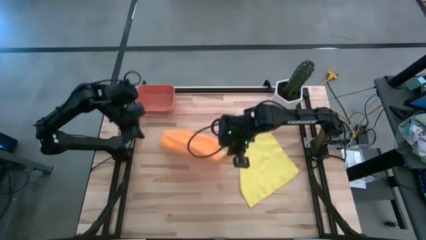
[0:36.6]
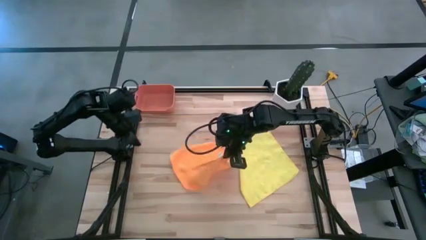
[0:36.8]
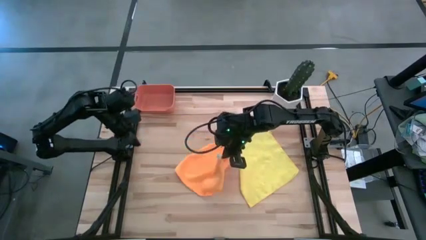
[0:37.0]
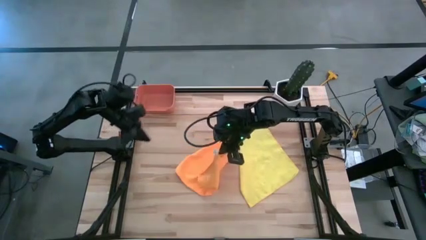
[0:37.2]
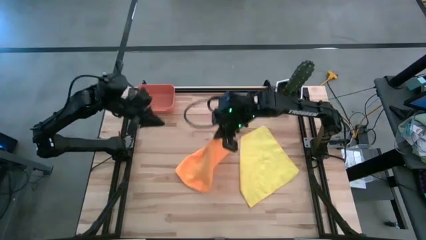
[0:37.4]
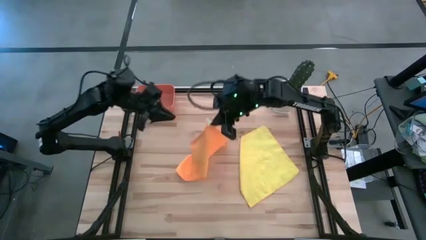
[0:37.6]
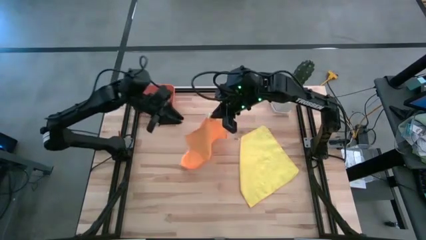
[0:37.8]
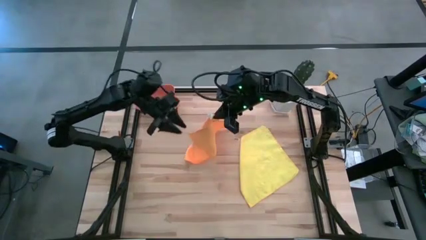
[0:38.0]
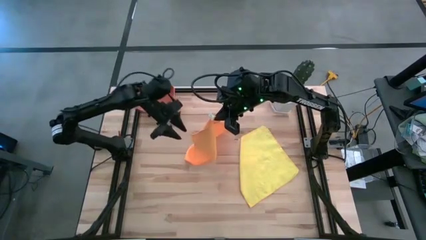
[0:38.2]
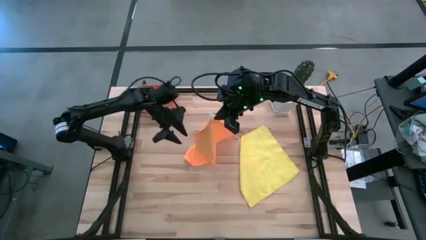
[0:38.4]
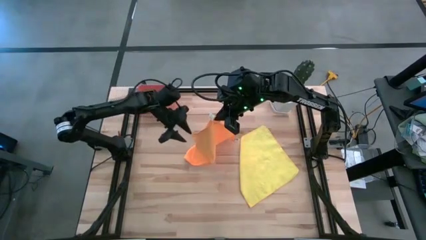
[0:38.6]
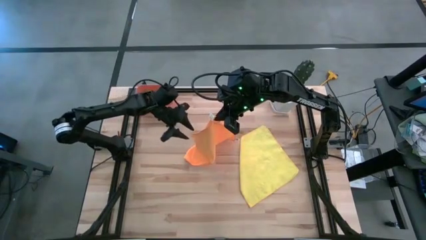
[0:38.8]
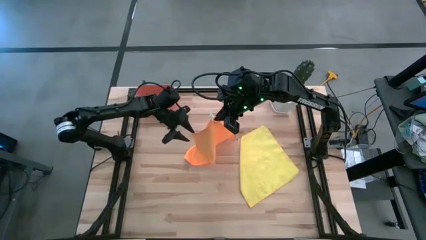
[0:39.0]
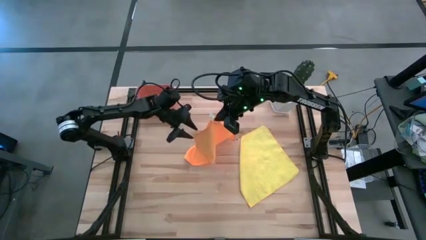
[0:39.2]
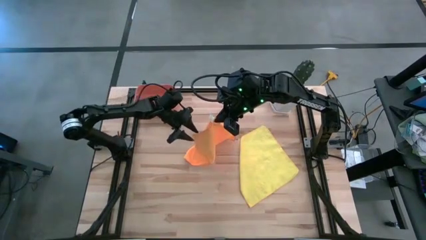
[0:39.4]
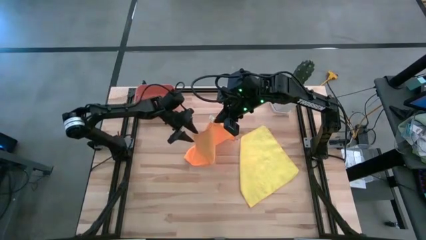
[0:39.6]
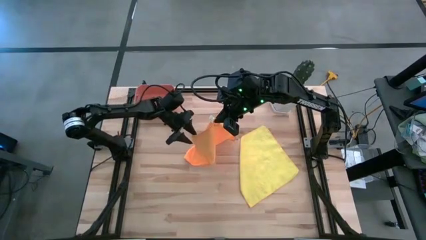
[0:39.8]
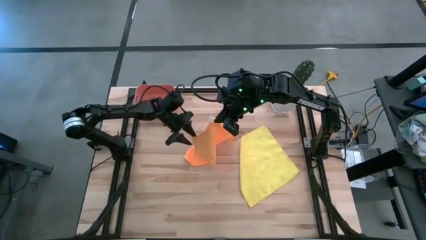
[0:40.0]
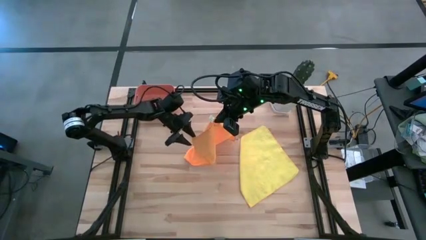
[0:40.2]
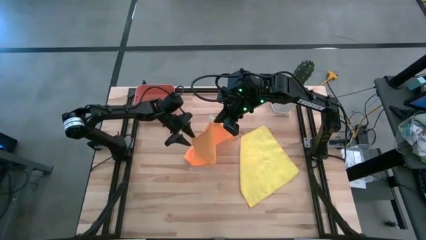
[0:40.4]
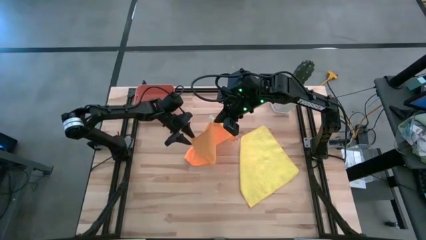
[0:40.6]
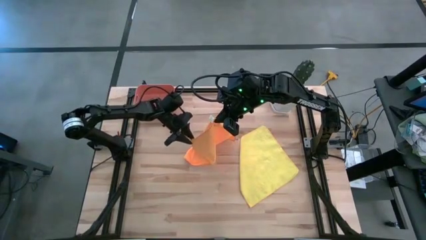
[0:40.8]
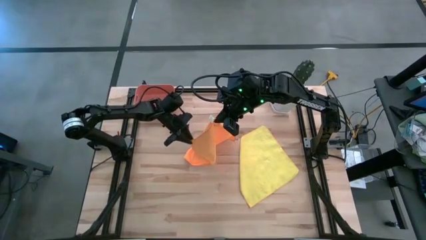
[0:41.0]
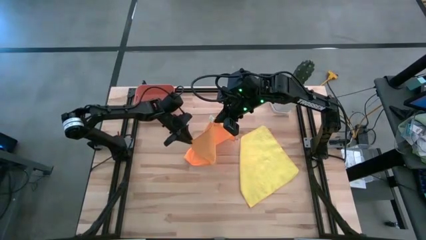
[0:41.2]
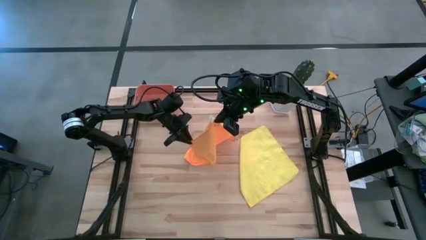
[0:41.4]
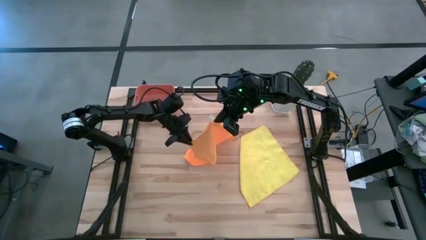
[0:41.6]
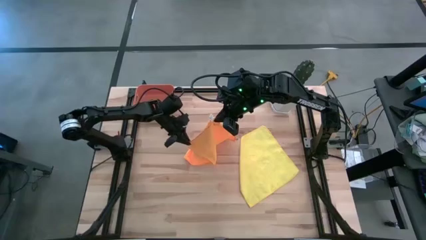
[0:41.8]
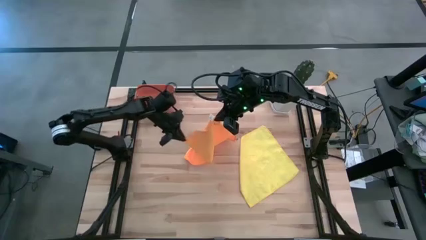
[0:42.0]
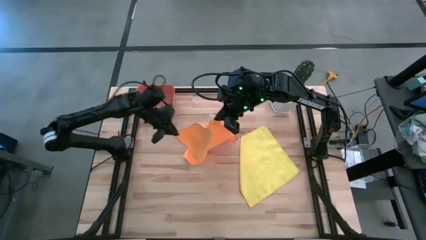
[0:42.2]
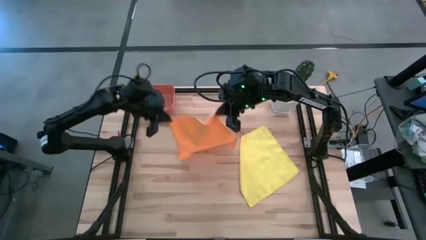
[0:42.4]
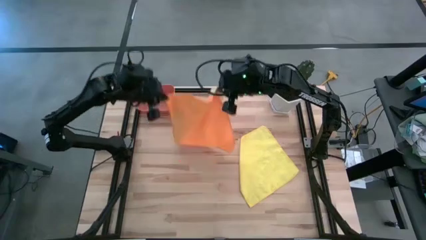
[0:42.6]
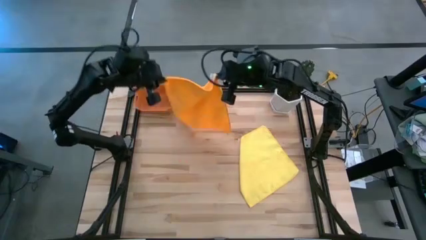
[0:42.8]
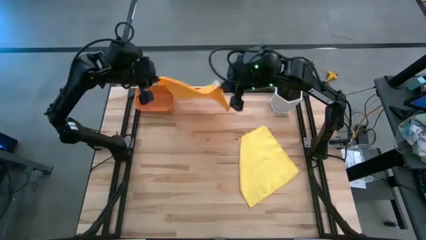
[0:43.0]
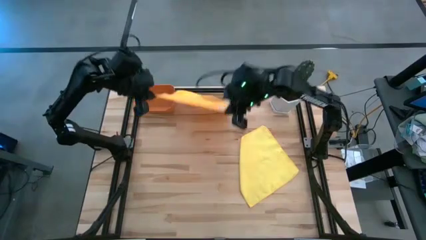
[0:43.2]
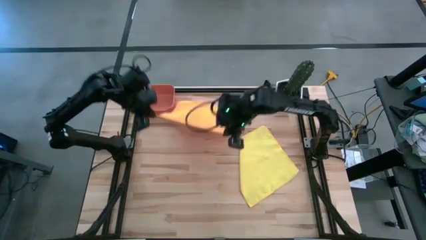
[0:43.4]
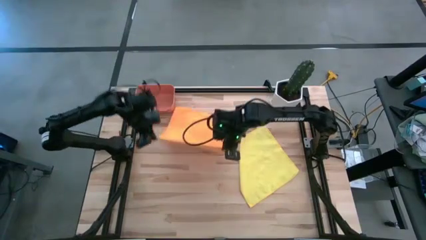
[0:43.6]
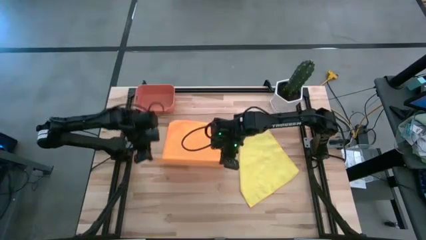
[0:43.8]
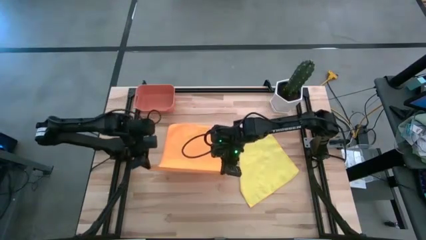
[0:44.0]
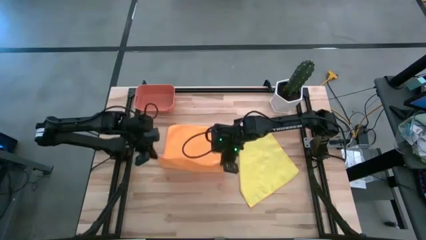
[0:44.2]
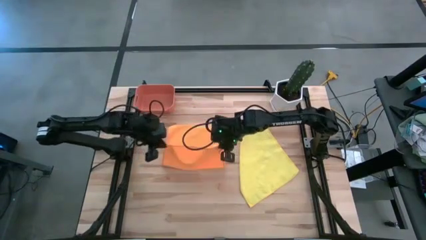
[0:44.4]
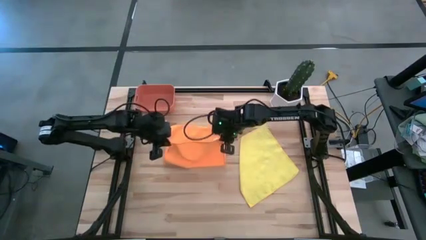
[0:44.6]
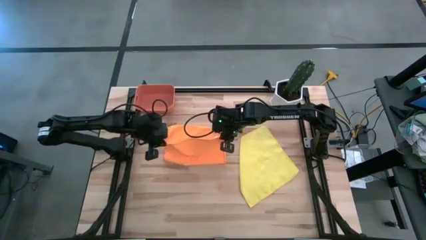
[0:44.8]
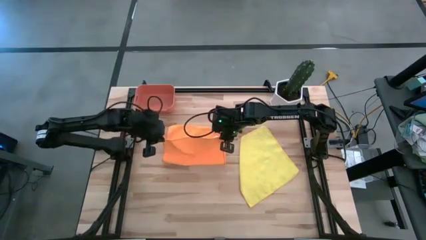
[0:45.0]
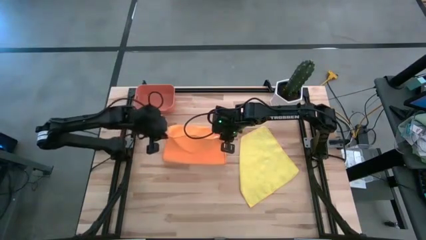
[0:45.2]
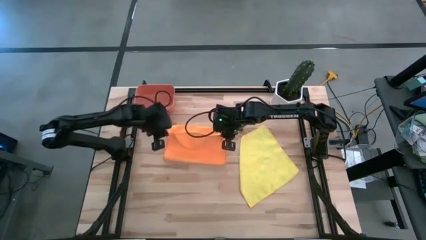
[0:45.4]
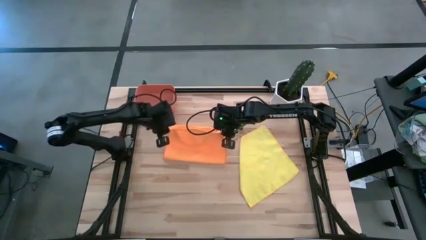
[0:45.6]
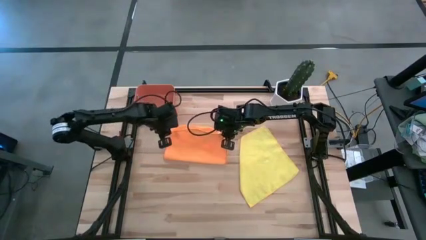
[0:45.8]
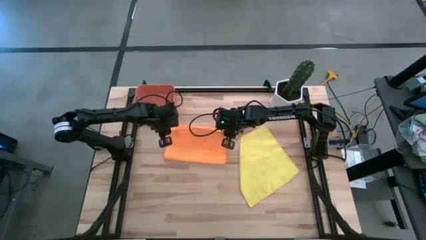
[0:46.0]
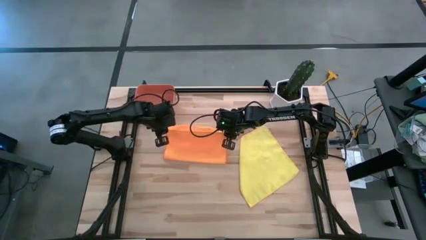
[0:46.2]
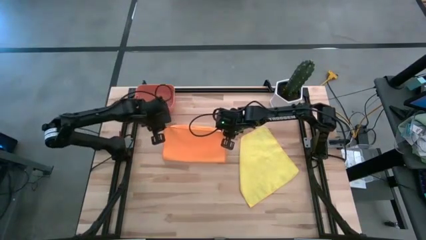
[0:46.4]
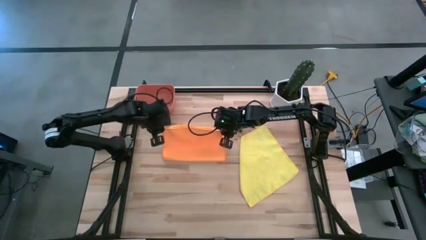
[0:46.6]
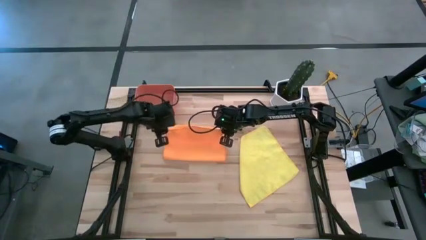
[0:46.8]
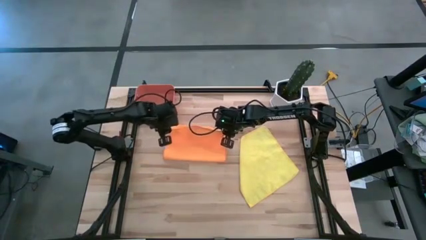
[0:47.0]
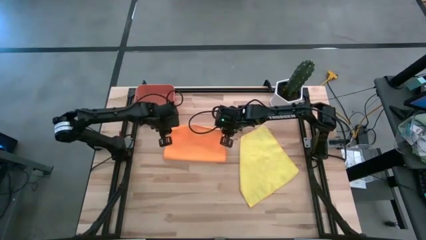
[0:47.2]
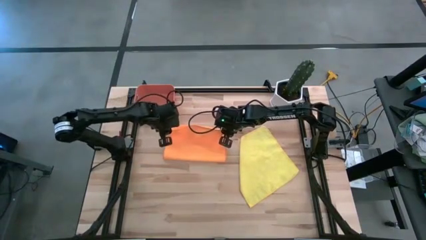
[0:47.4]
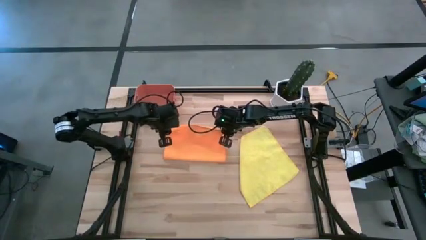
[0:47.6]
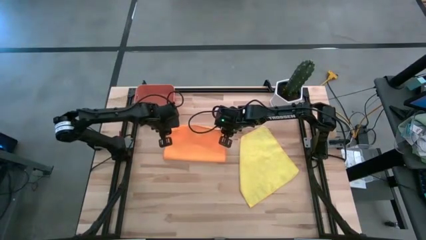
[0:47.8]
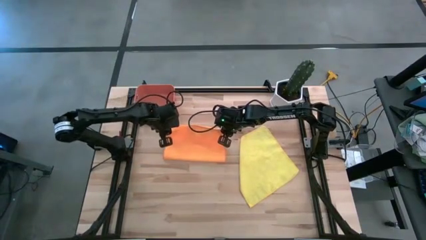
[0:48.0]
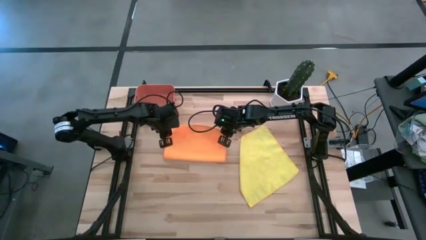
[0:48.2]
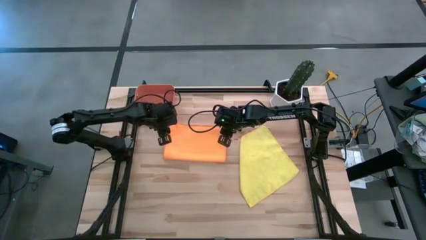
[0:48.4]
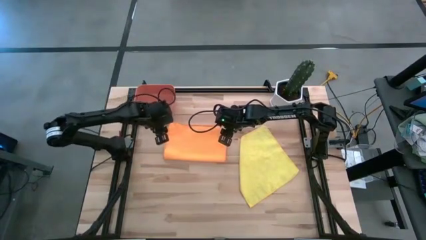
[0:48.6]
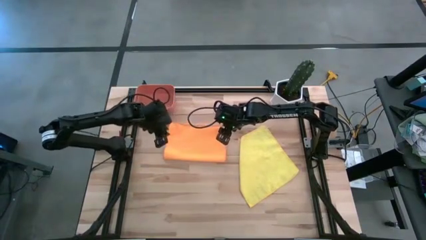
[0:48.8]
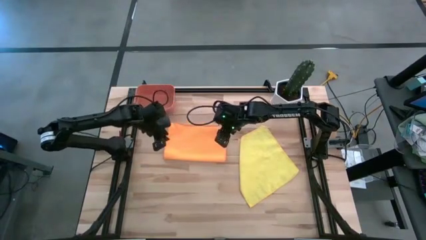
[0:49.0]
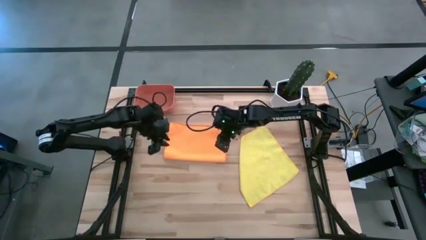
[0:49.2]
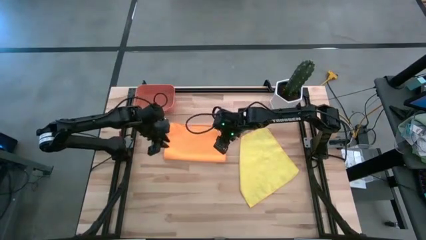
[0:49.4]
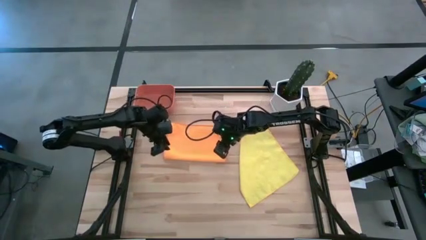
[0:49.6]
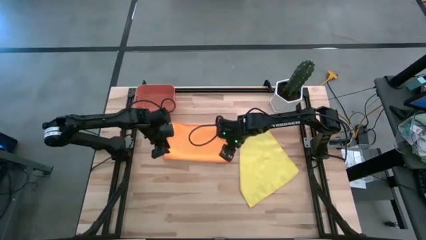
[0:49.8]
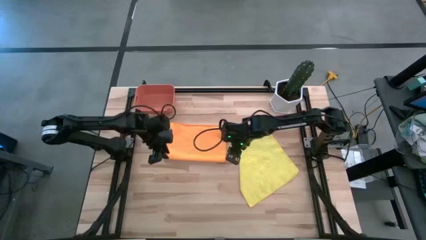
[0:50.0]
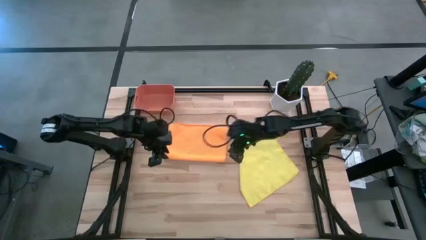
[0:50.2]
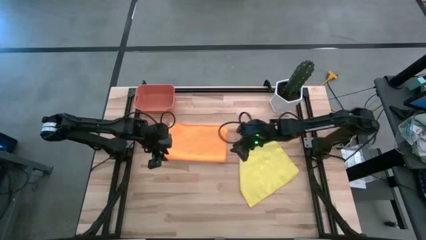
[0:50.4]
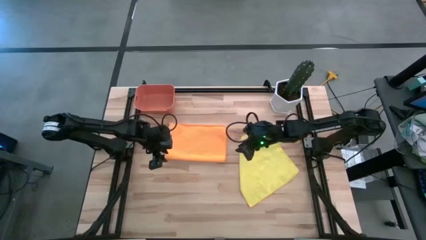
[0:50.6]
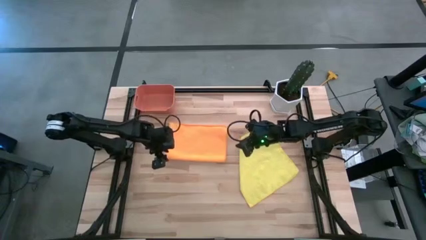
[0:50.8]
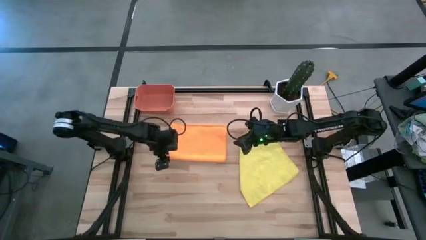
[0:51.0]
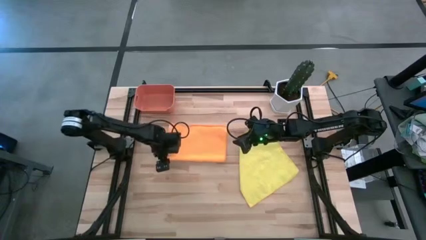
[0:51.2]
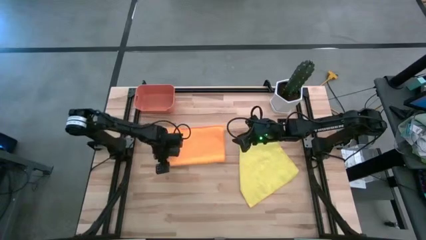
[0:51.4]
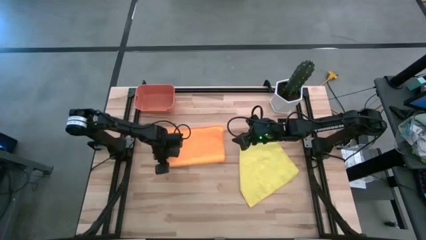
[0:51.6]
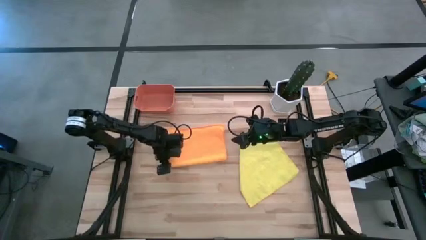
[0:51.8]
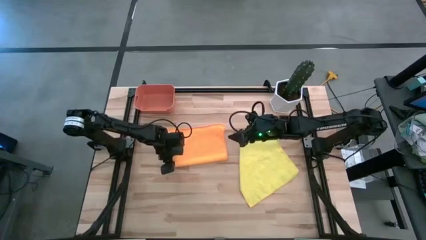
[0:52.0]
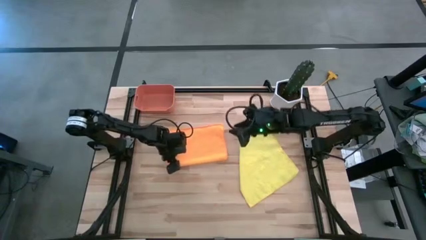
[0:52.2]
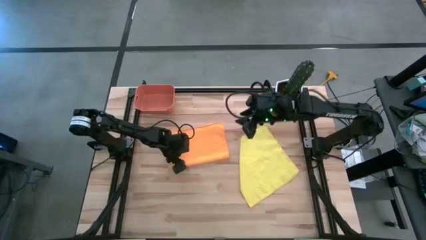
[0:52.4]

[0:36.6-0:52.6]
Task: Roll microfiber towels into tight, uniform cylinder then place into a basket
Fold the orange towel
